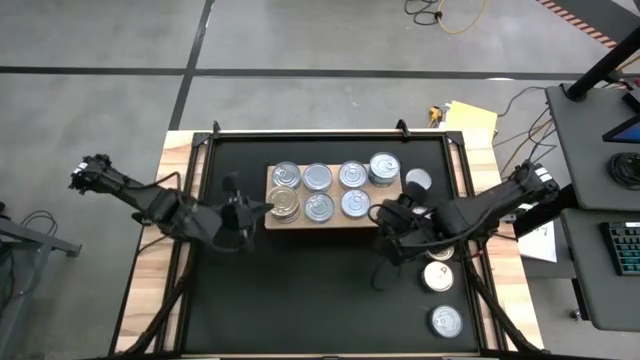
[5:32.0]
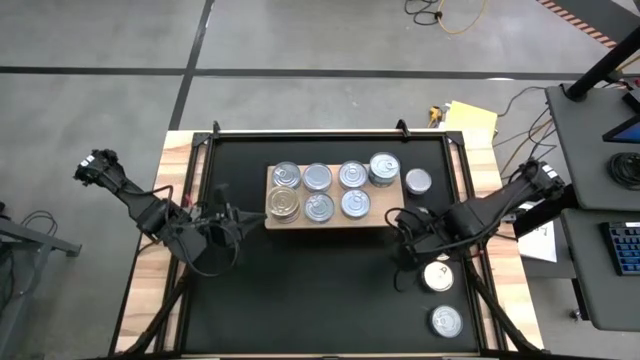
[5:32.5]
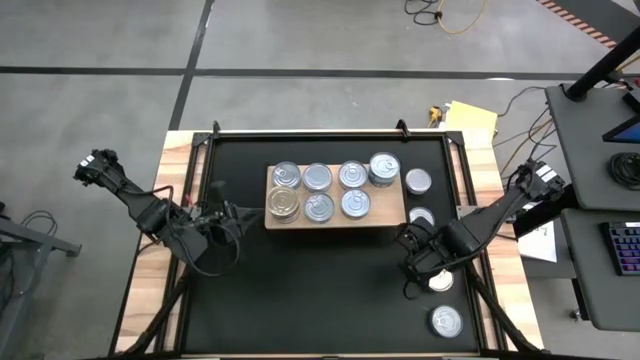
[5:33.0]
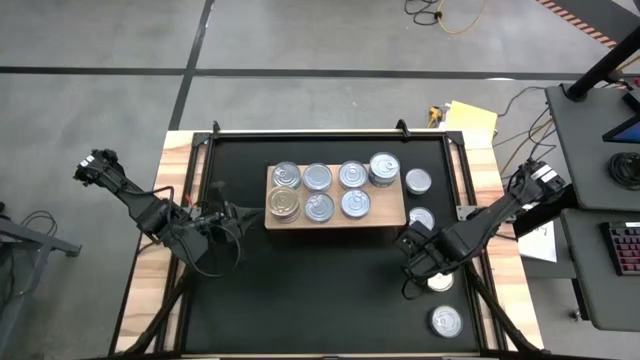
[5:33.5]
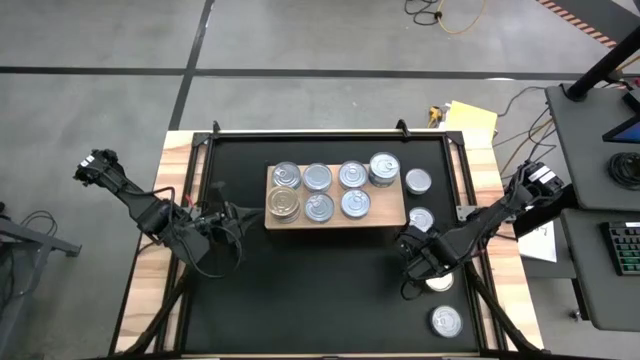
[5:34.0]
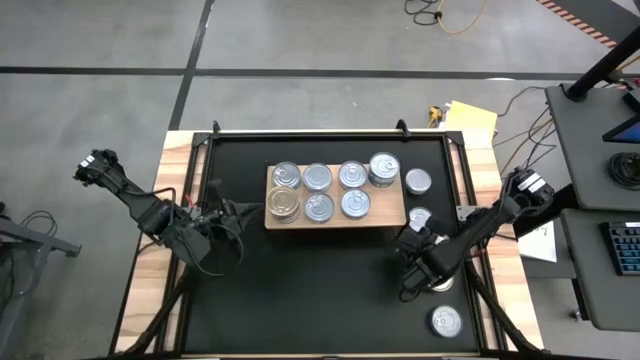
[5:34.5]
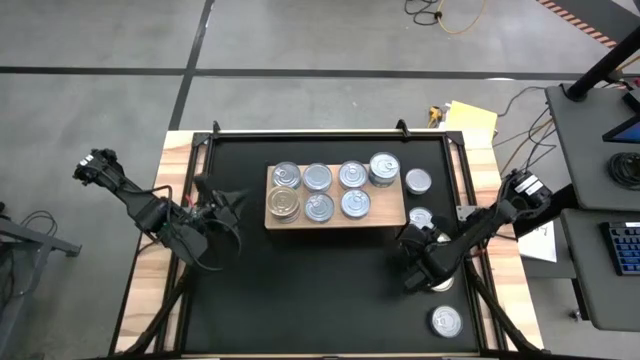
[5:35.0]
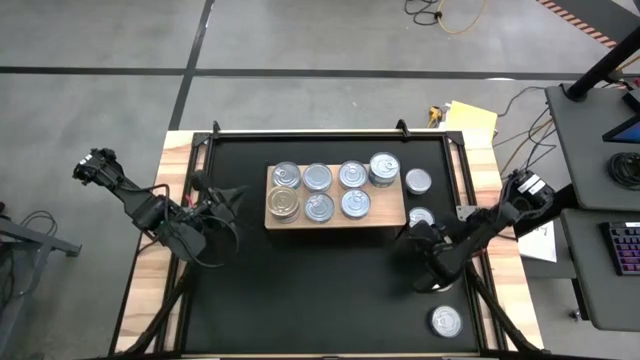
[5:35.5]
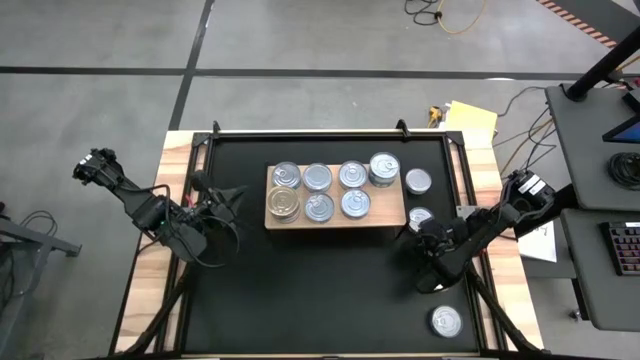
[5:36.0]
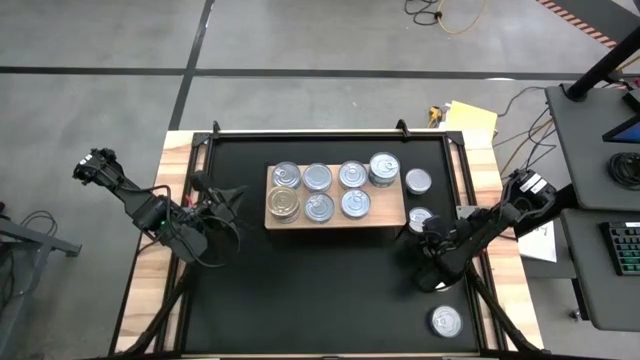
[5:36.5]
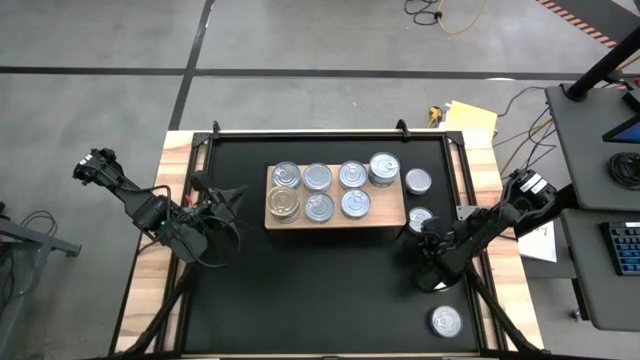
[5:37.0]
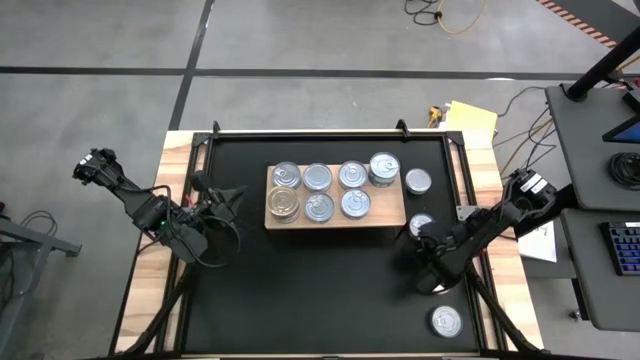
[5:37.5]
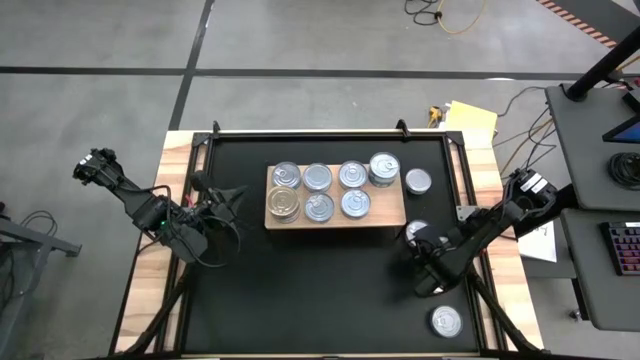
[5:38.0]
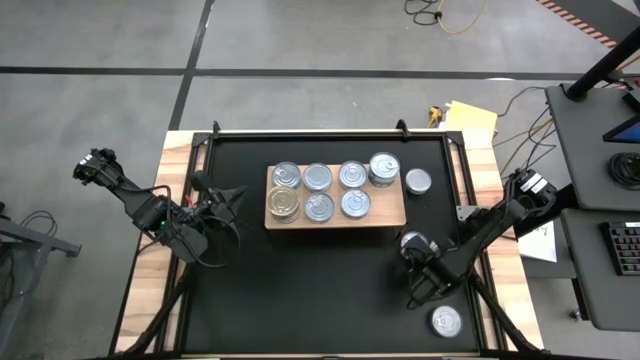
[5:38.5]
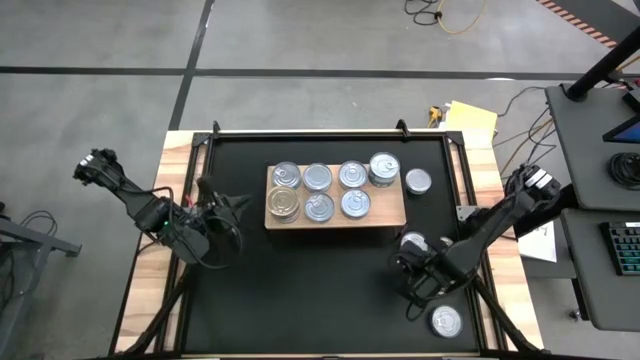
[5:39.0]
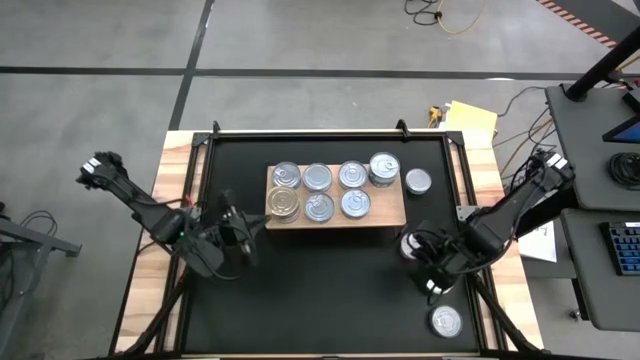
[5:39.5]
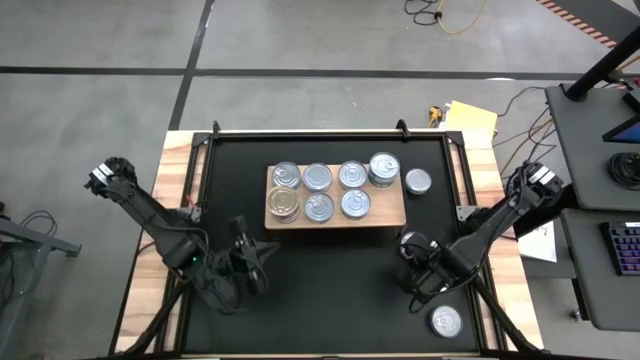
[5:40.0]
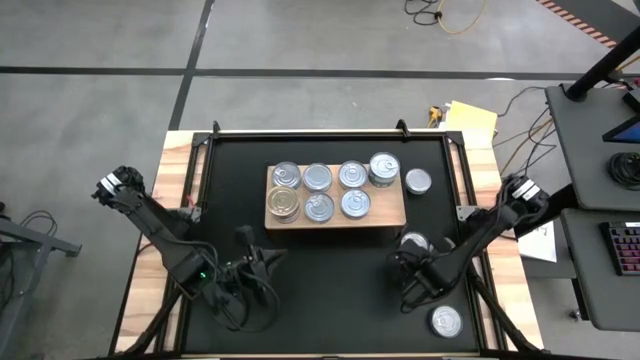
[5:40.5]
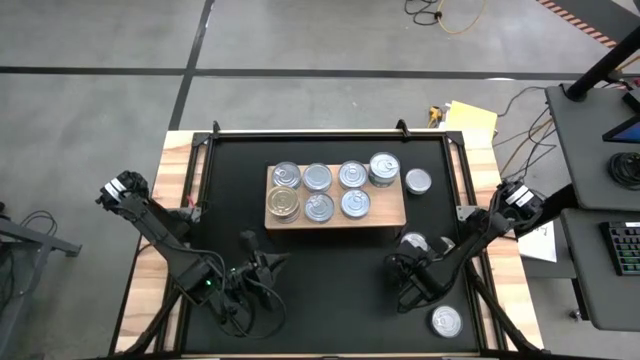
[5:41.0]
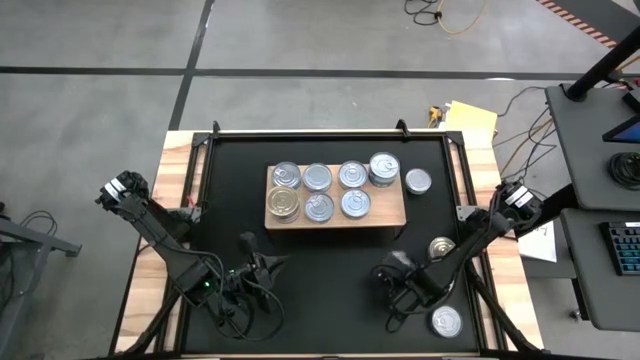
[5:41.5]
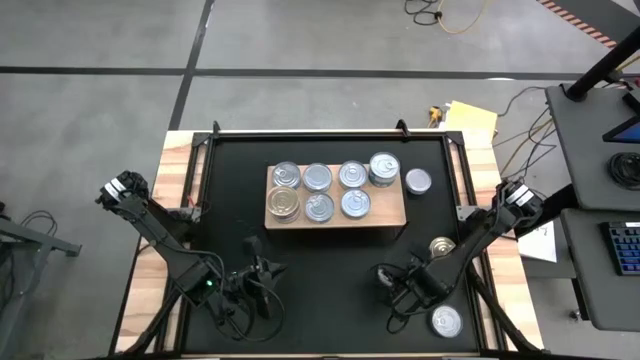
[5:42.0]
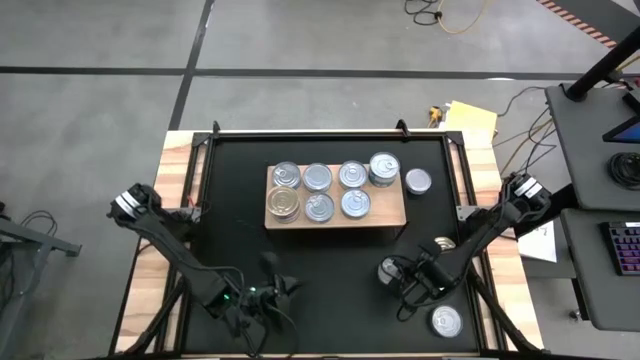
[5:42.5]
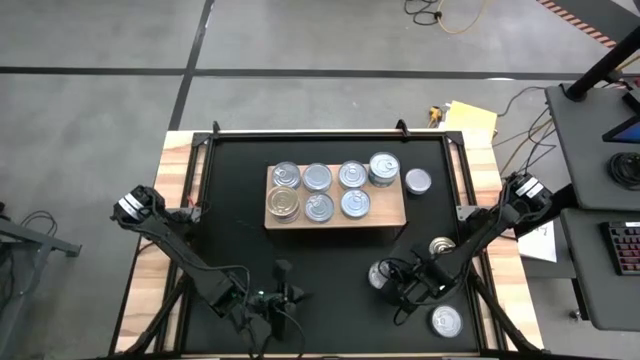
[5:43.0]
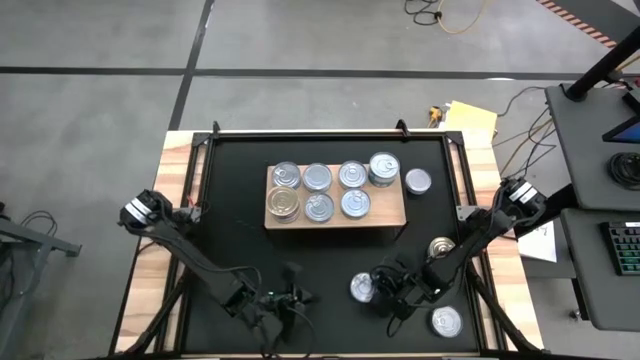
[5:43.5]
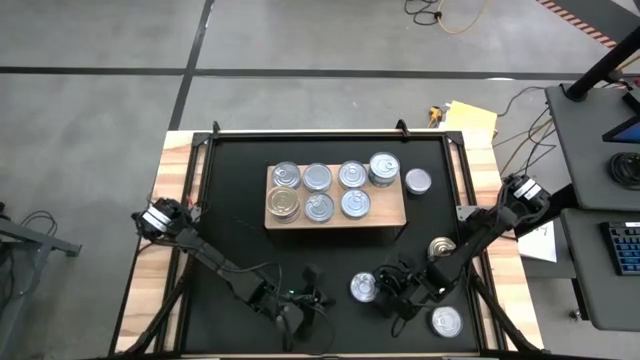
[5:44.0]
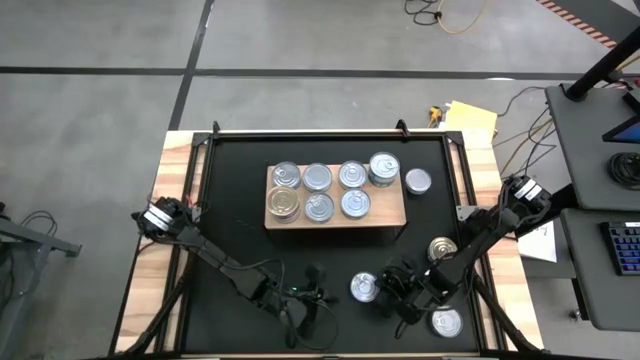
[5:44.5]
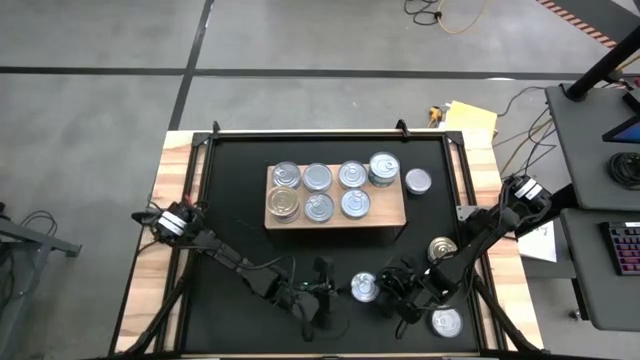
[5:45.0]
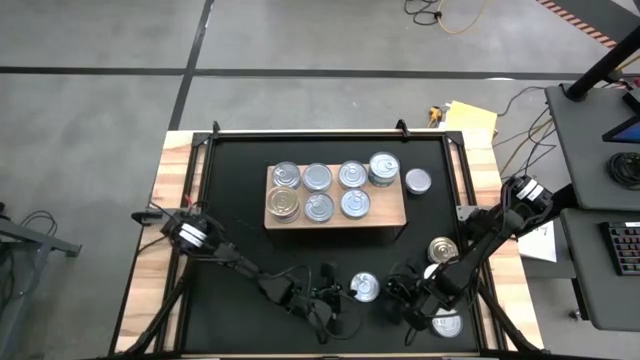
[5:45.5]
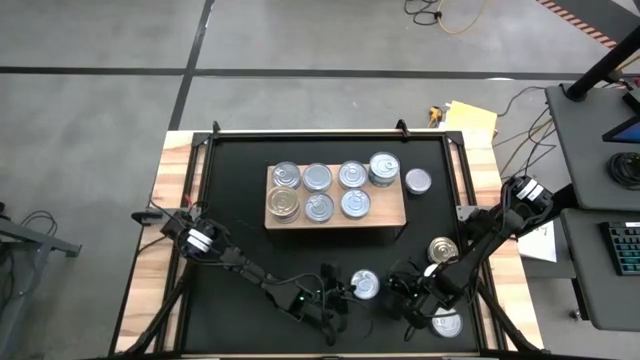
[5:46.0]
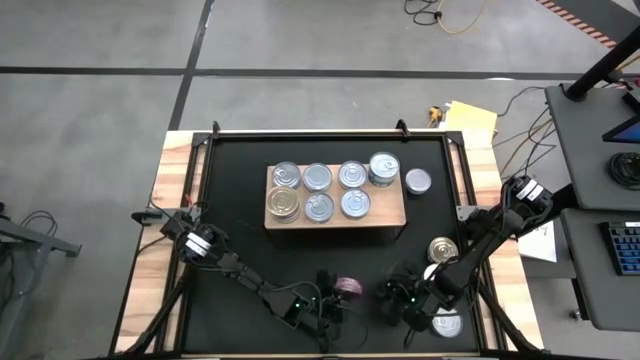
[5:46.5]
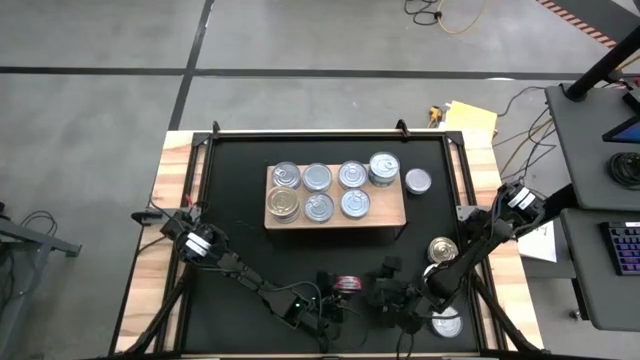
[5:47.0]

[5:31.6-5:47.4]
Task: Stack canned seafood by type on shelf
Stack the red tuna can on the red tuna can

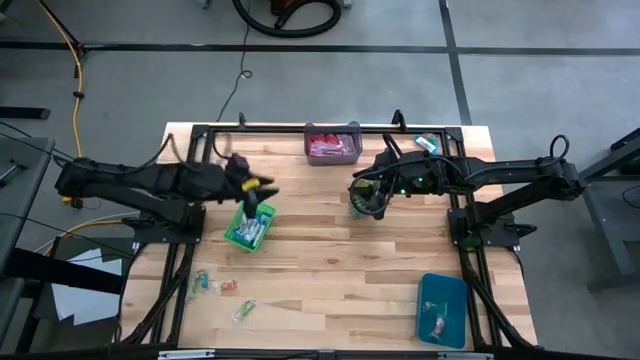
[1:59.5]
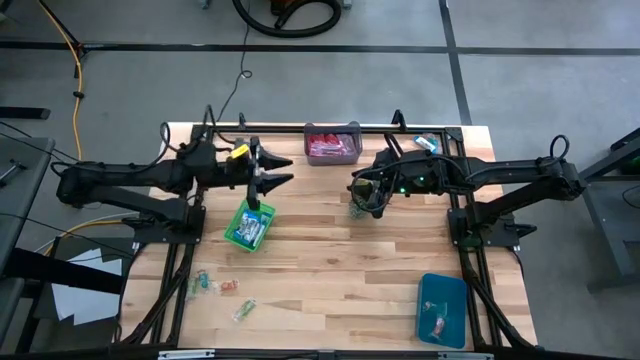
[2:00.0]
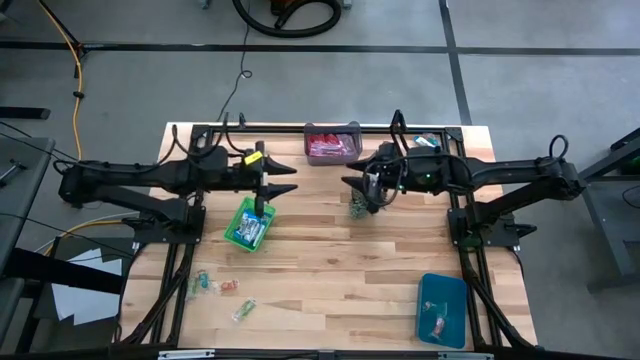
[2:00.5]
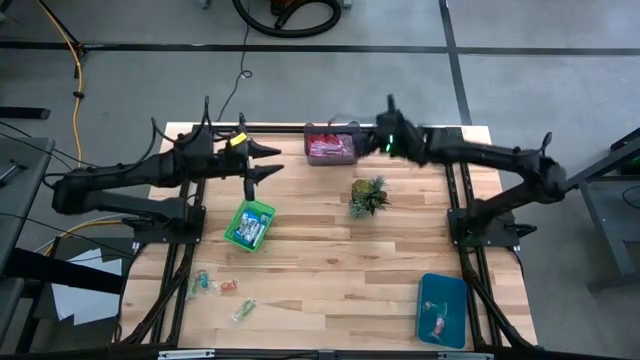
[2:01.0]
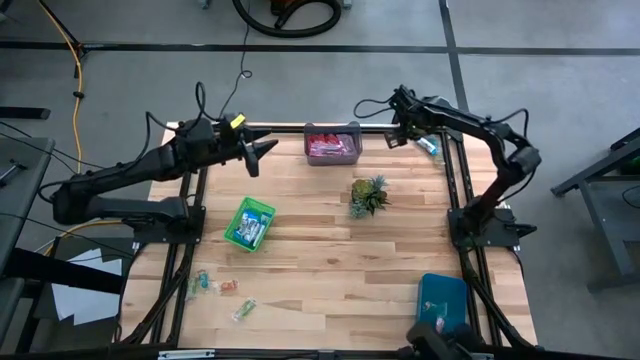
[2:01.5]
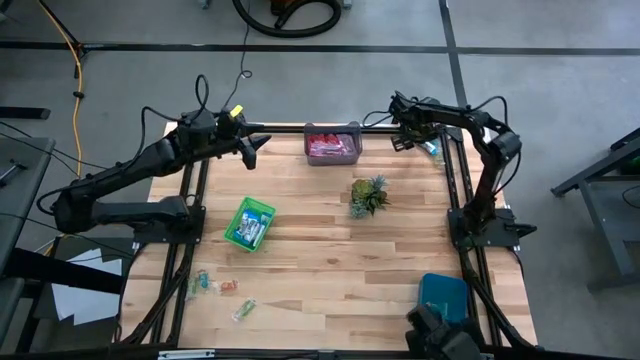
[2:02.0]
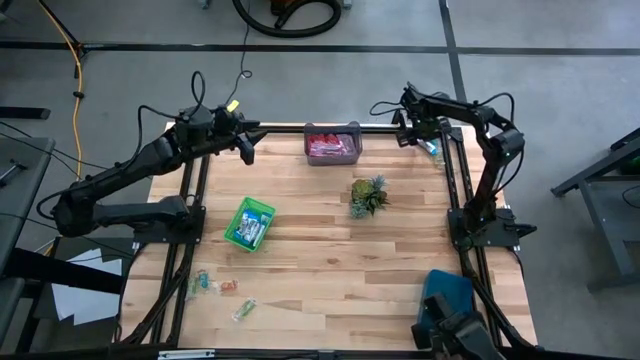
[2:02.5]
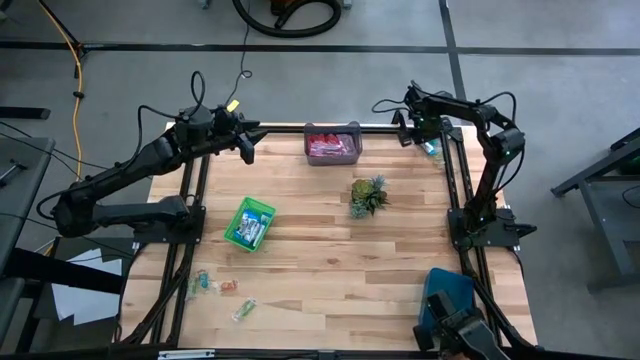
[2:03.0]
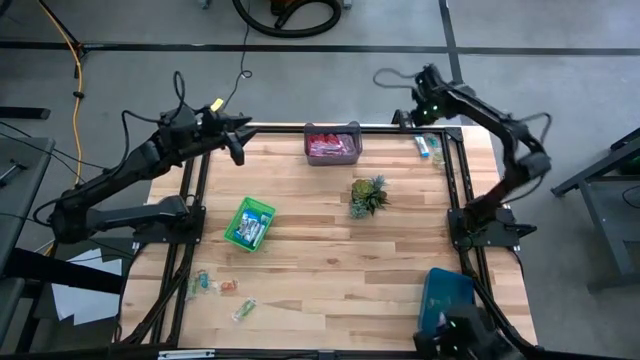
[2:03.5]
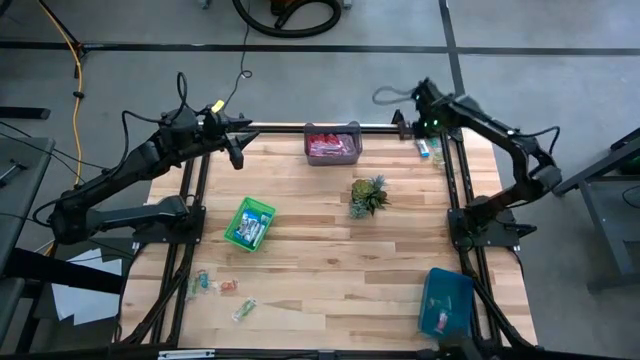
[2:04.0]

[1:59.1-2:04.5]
Task: Sort candy
Put the white candy into the green bin

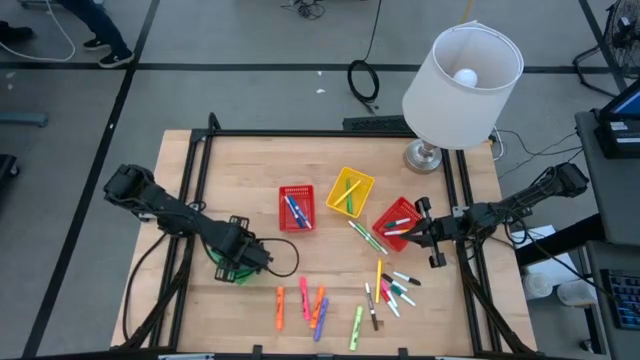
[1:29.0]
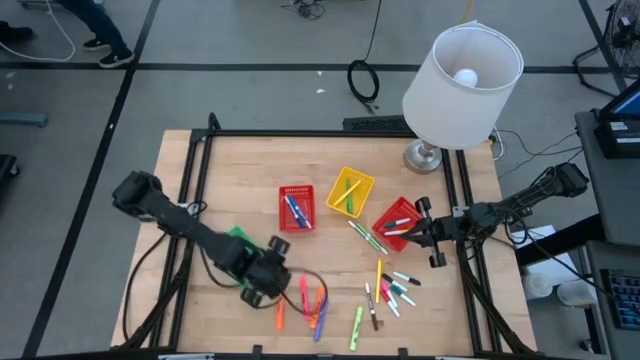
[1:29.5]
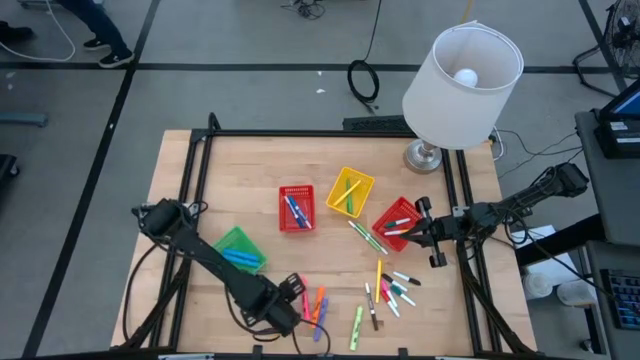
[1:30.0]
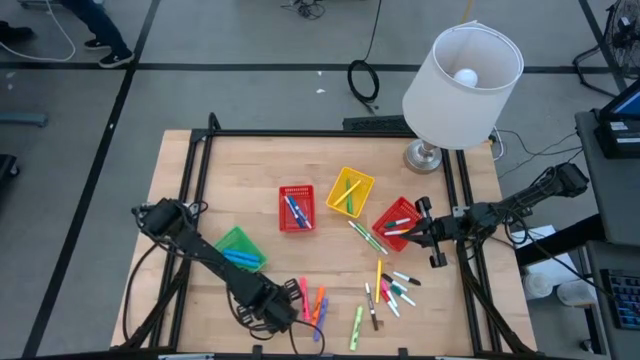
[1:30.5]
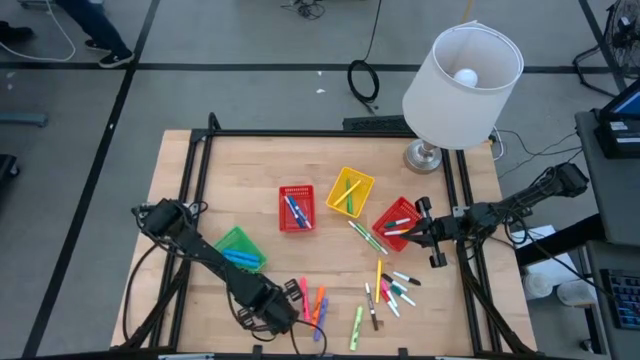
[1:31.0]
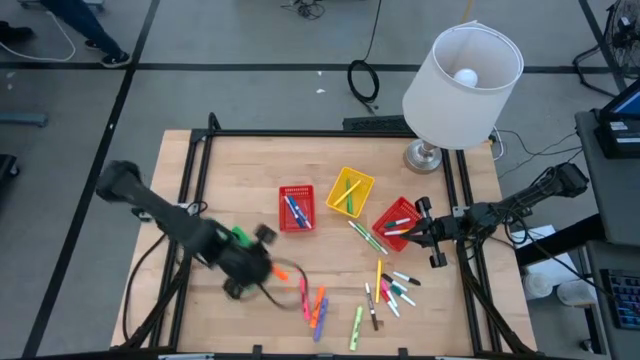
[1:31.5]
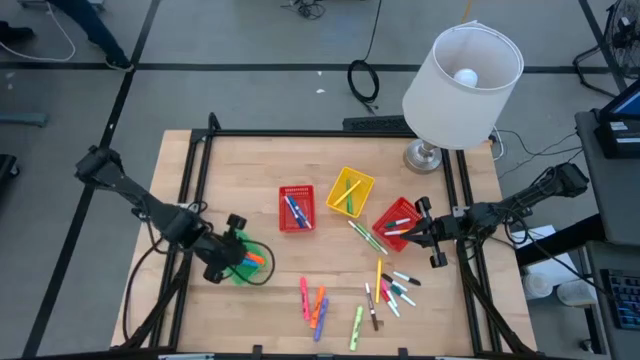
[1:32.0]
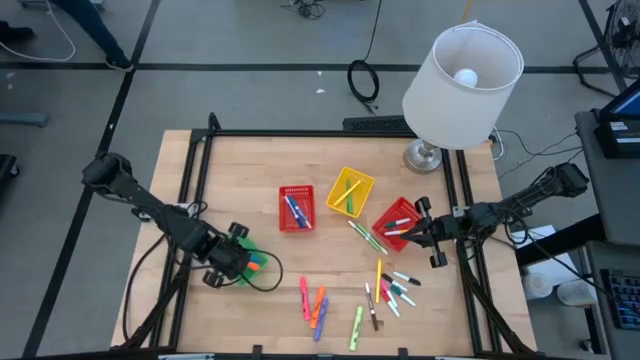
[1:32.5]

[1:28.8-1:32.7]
Task: Pick & Place Markers
Put the left large orange highlighter pen into the green bin
